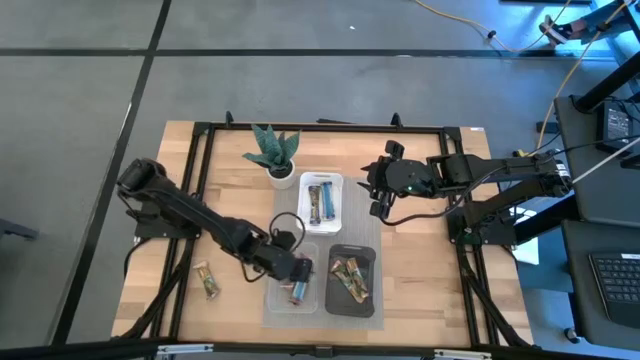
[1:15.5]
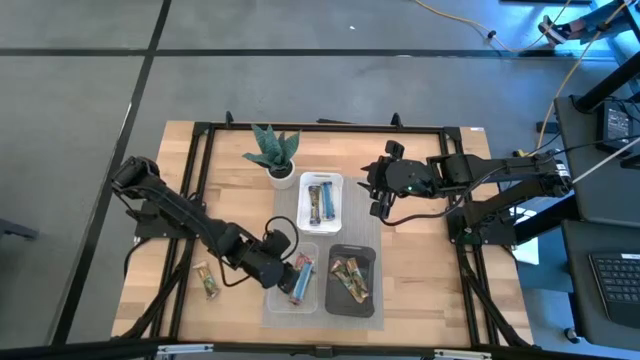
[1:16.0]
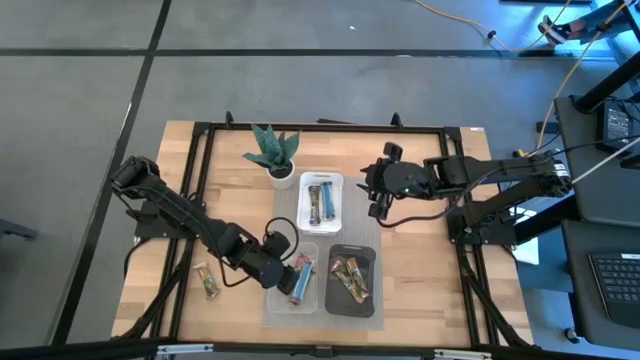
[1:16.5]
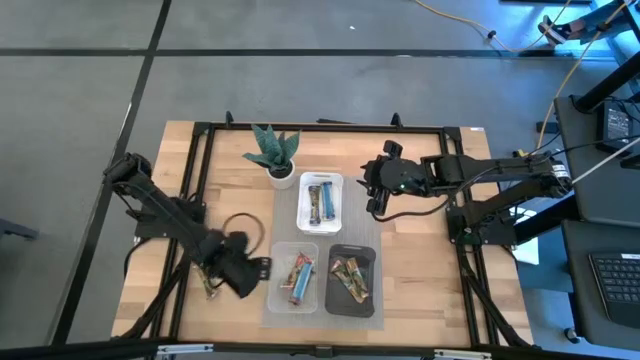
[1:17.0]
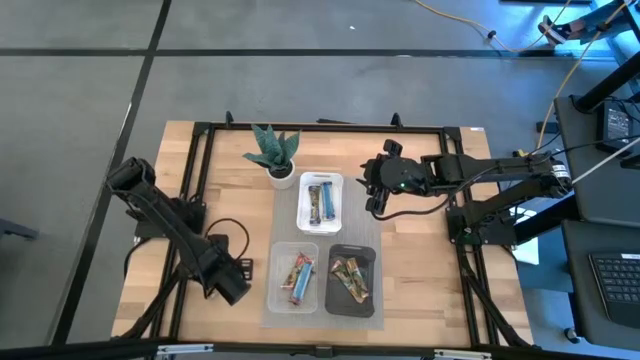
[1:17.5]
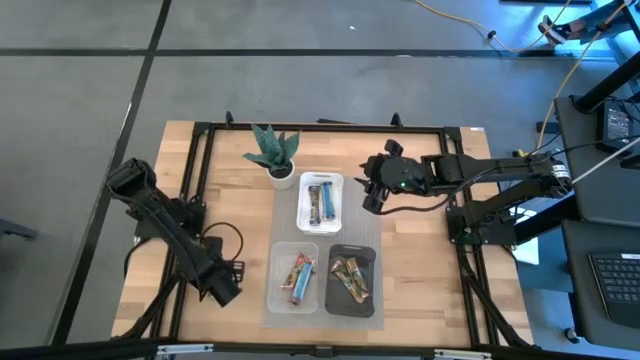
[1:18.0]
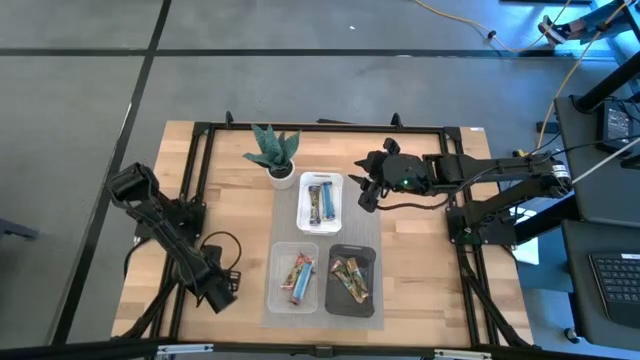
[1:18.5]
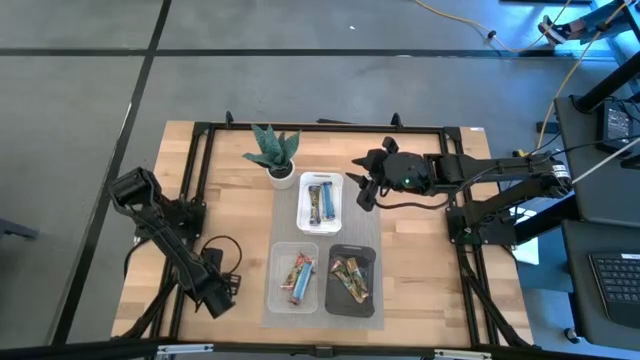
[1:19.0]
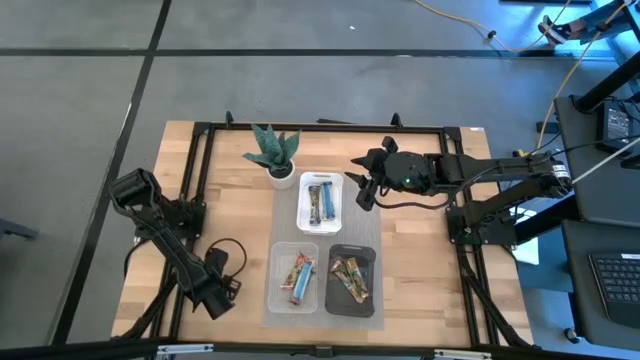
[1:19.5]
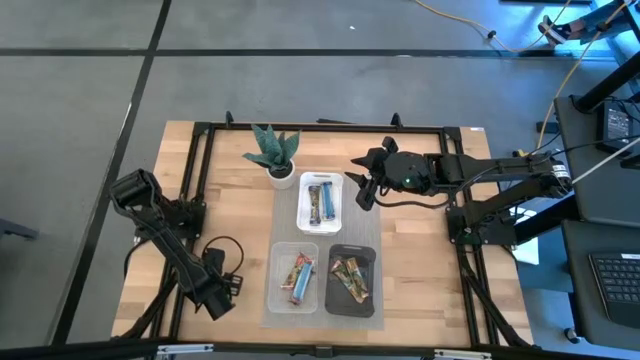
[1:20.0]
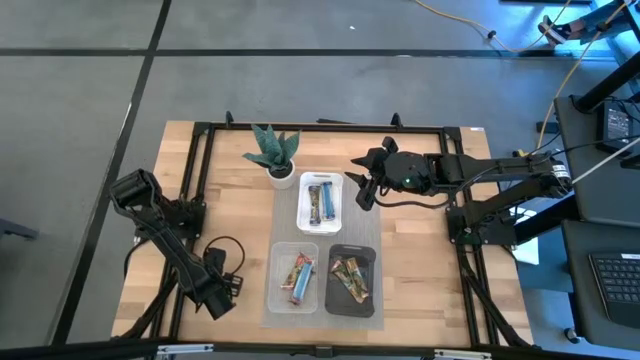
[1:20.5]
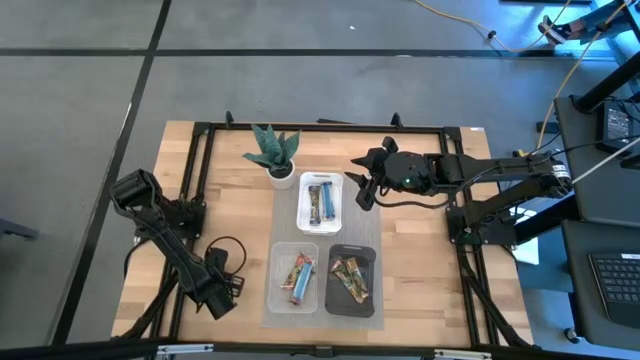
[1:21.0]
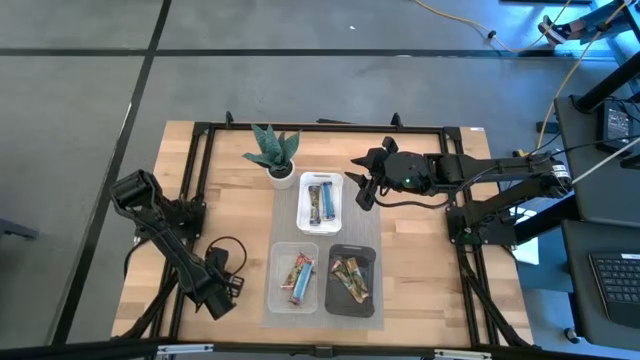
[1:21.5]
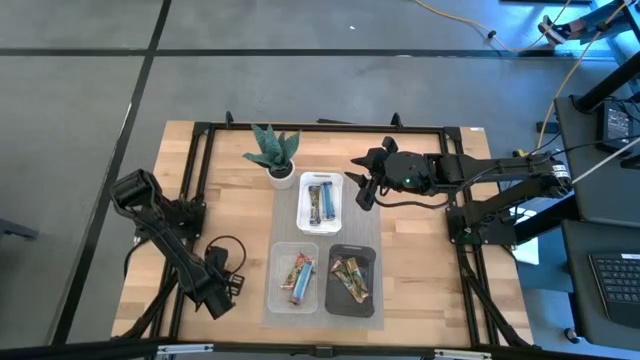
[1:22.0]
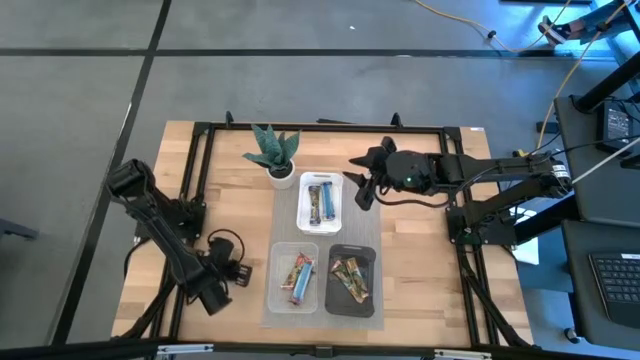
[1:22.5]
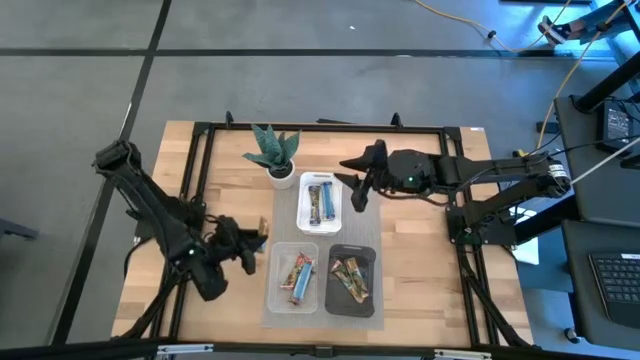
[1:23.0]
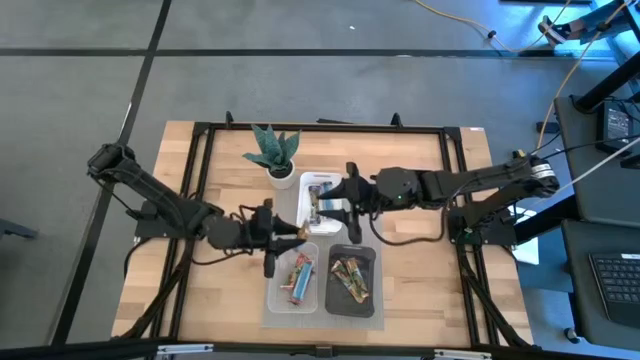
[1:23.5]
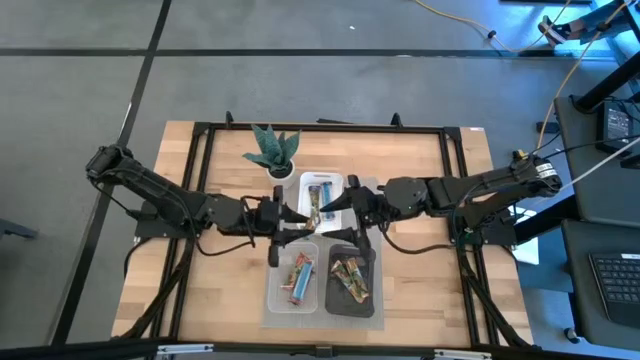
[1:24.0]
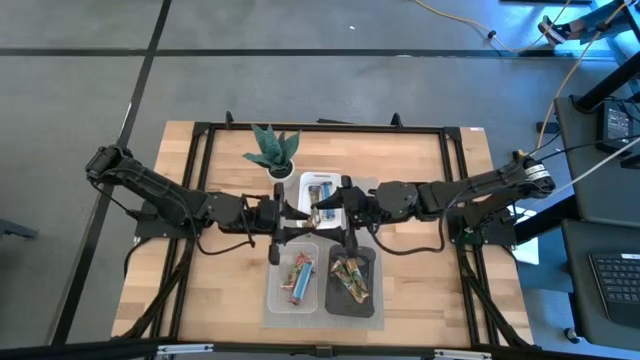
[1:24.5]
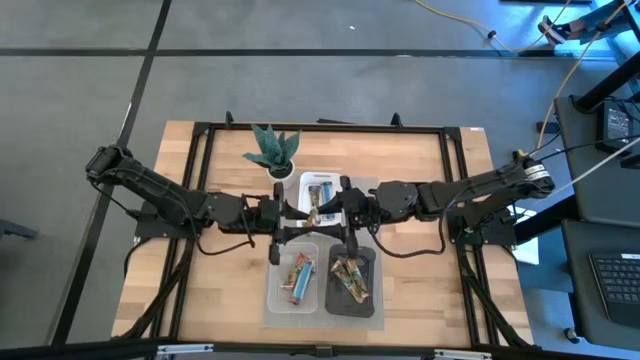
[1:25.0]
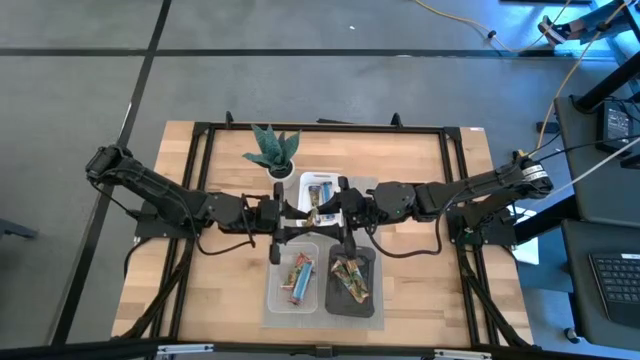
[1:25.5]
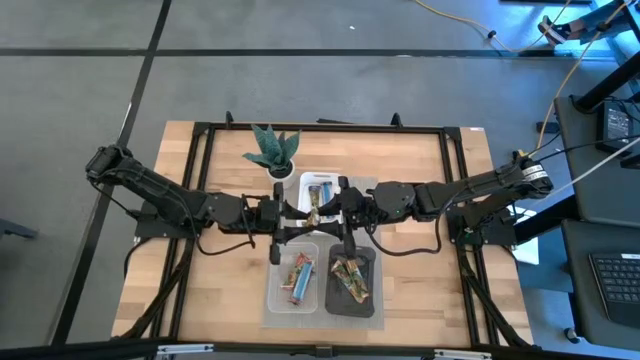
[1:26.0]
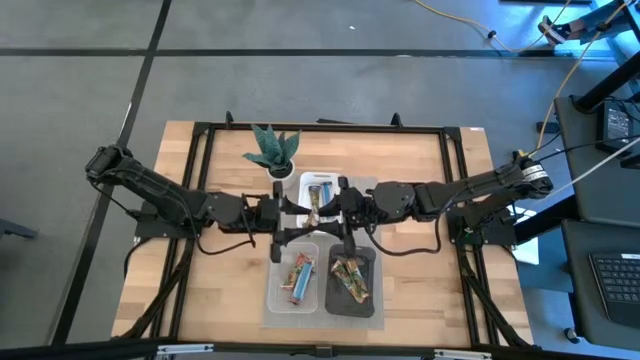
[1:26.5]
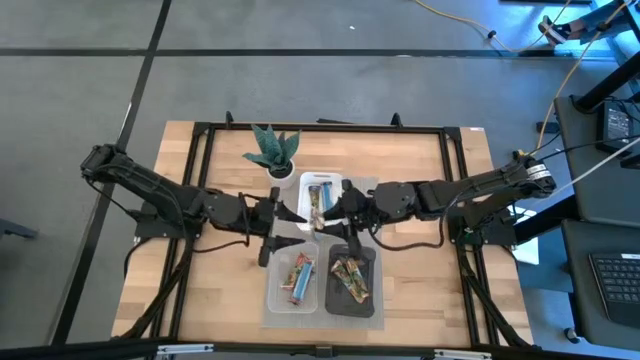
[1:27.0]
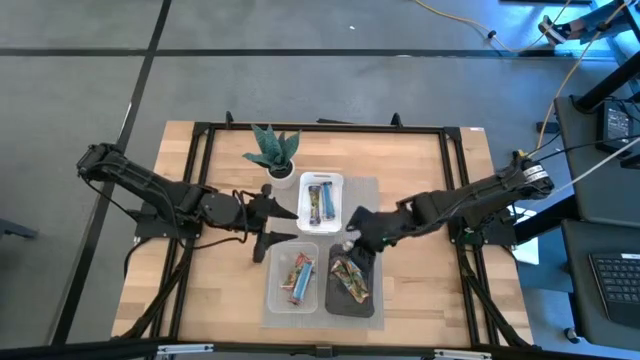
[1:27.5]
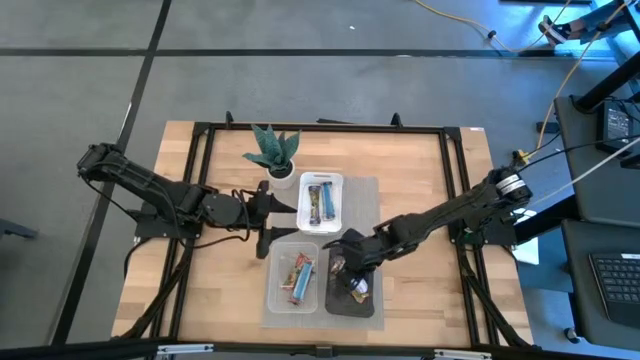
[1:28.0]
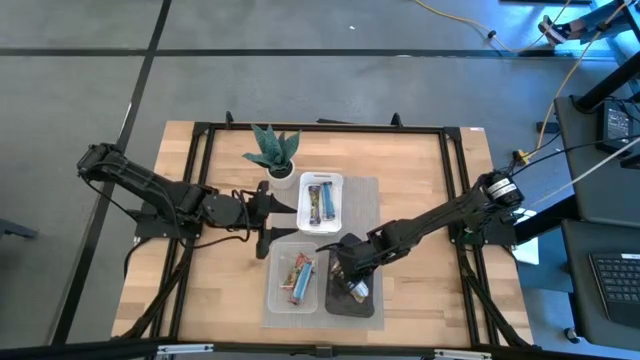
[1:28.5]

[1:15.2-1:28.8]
Task: Pick and place Granola Bars by type
Put the yellow granola bar into the black transparent bin

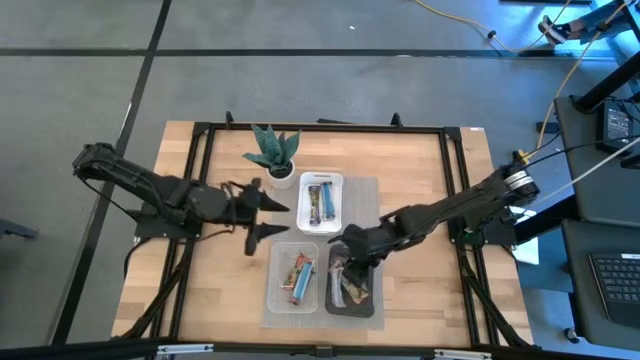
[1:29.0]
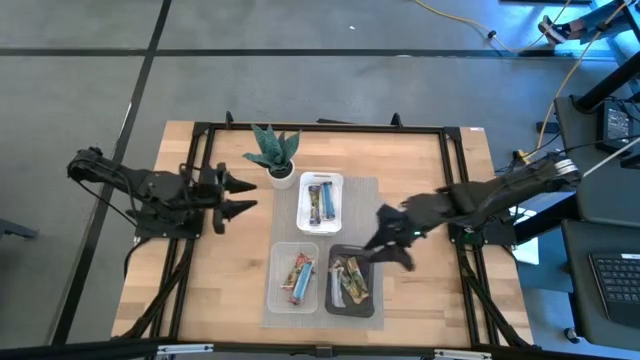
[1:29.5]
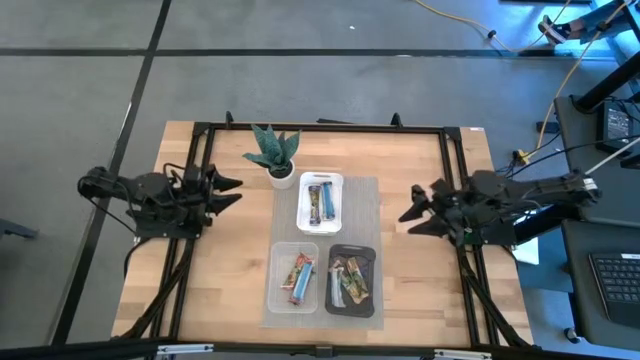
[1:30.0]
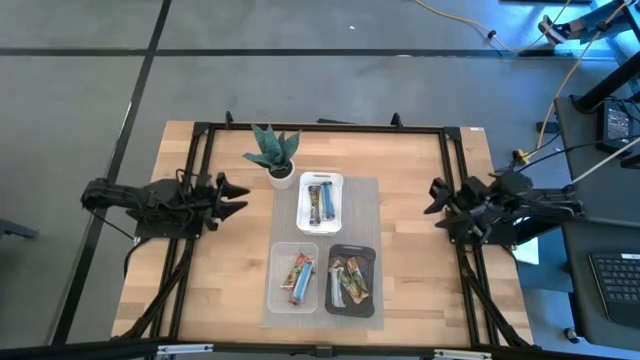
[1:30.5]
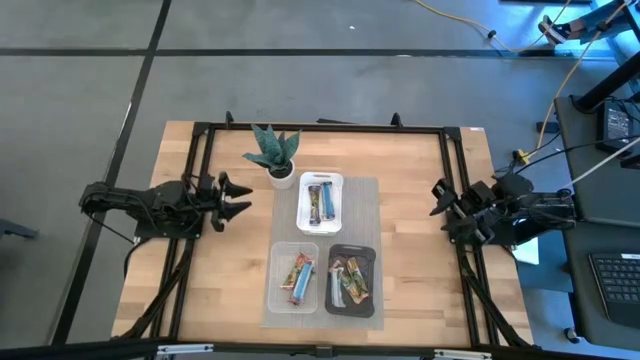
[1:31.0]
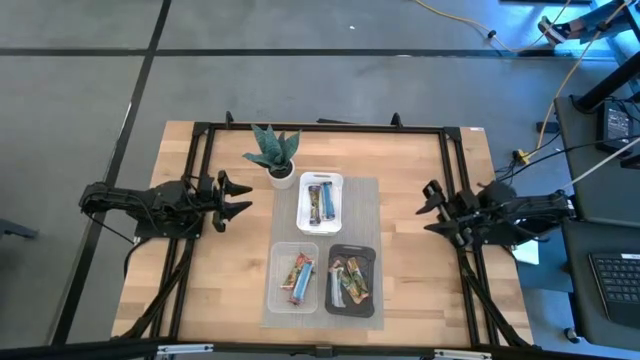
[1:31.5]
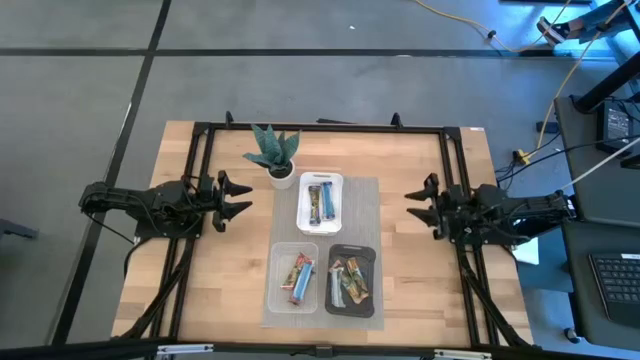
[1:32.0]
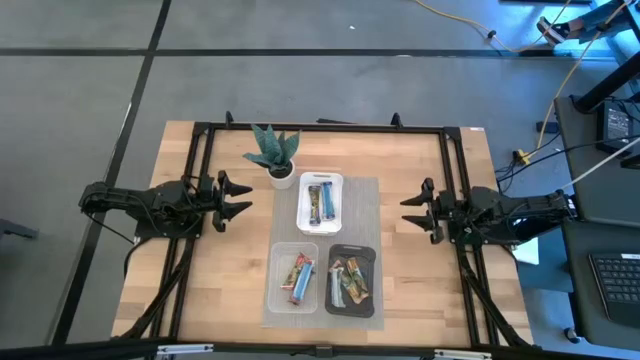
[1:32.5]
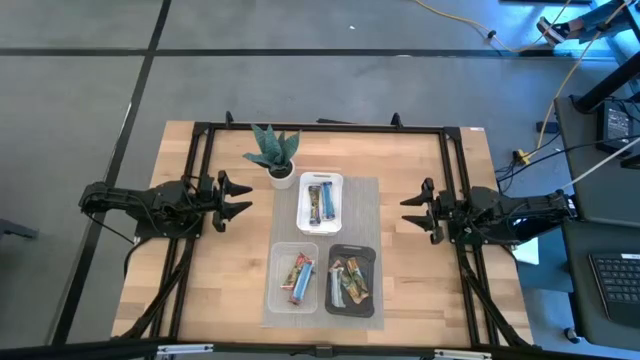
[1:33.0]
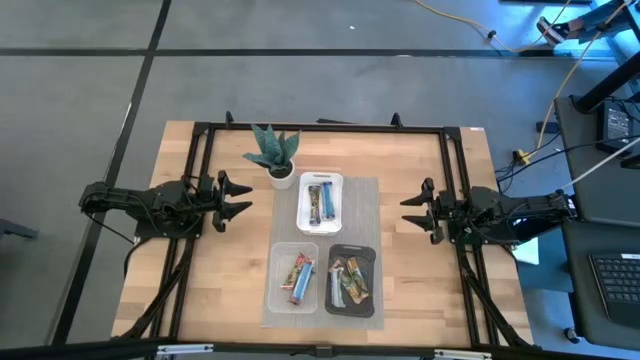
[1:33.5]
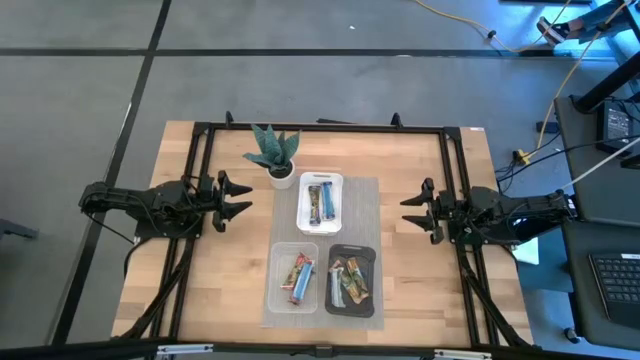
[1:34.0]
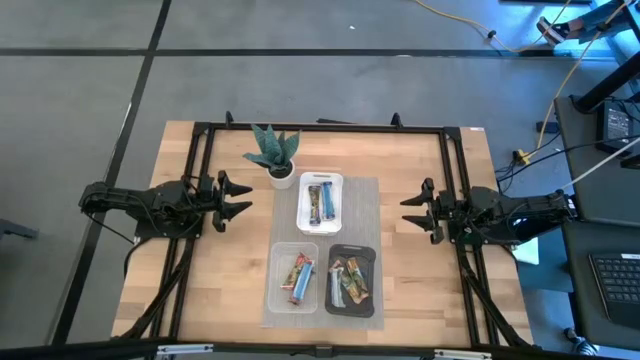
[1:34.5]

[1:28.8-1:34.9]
Return to Home Position

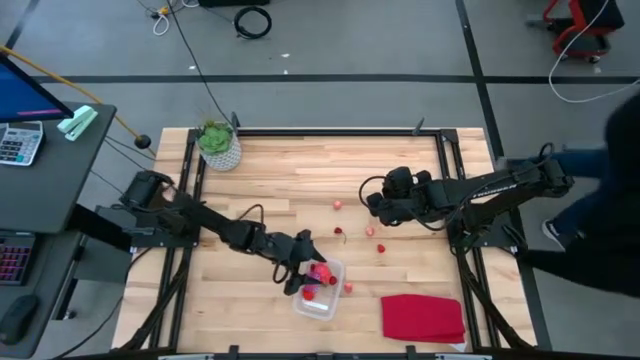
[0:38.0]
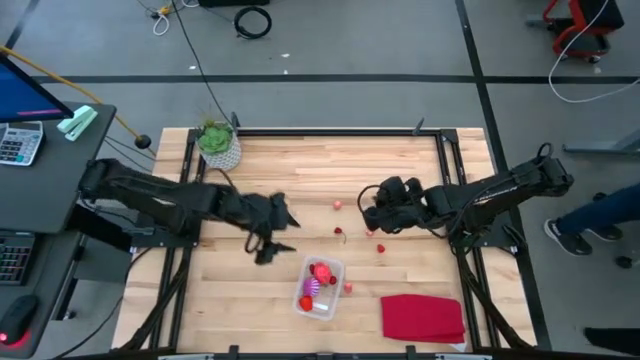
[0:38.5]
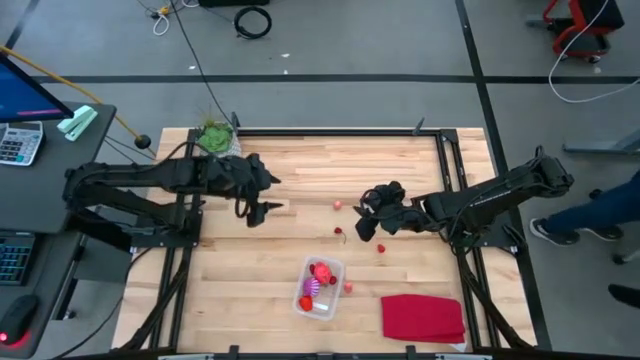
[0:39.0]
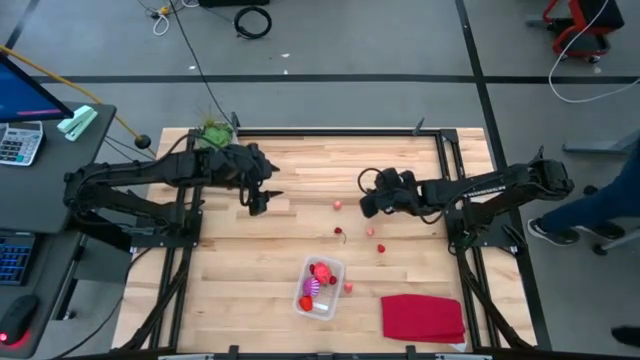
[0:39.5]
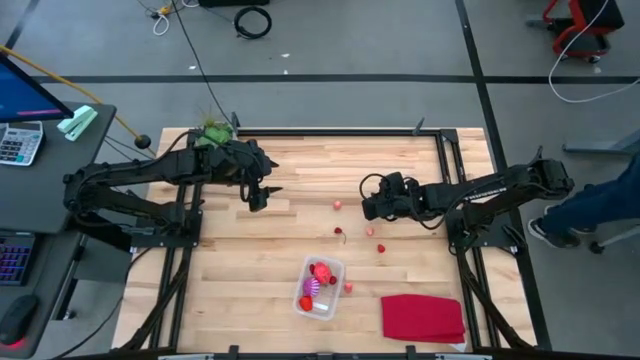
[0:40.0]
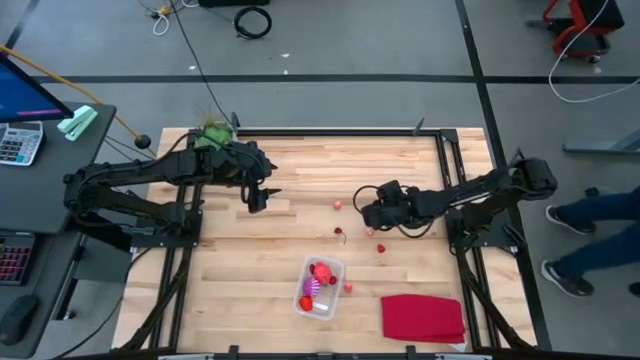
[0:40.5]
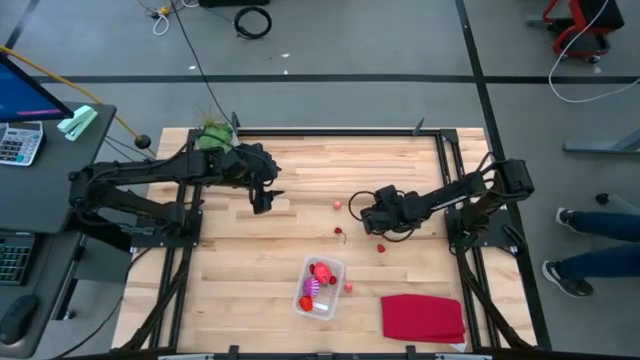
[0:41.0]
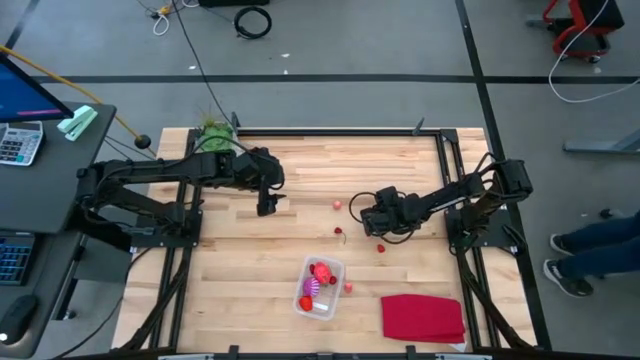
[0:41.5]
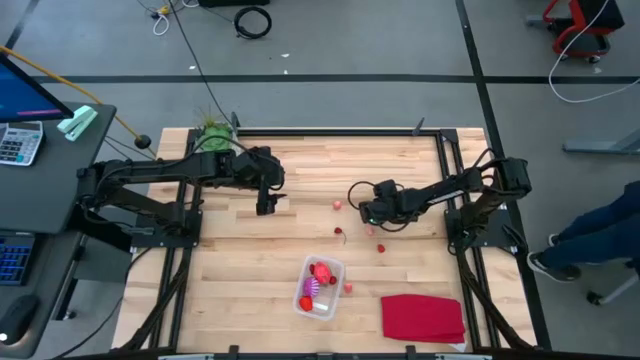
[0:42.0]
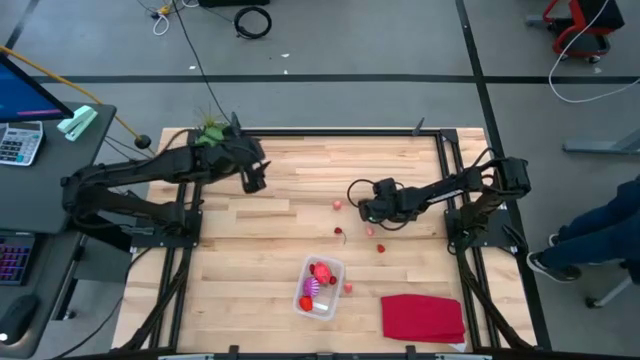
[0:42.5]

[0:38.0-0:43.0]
Task: Pick and placing Produce into tupperware
Put the top red cherry into the transparent bin
